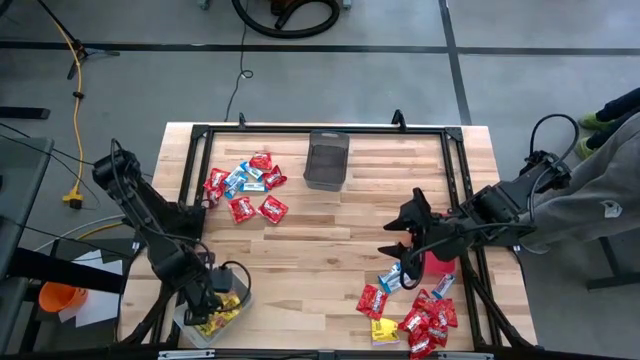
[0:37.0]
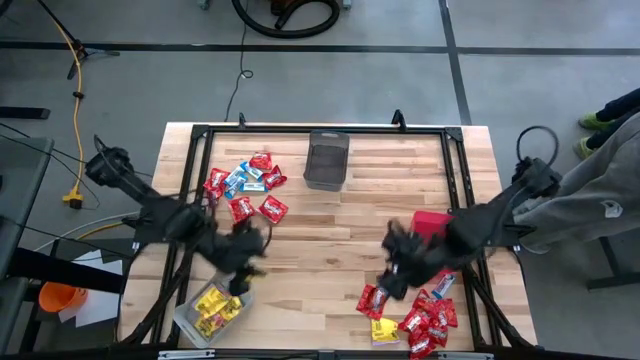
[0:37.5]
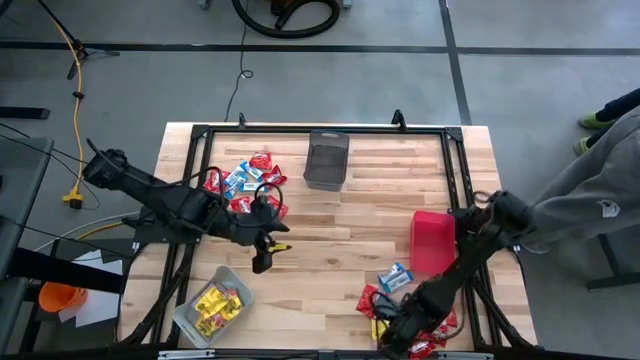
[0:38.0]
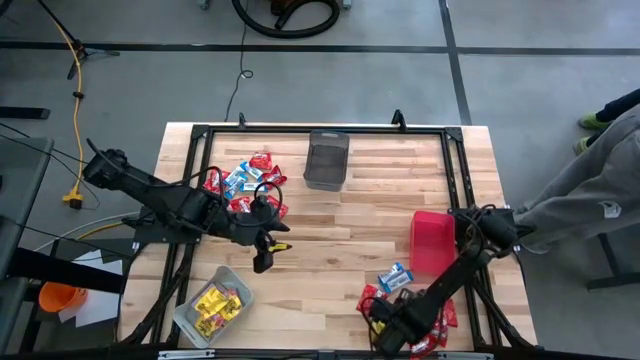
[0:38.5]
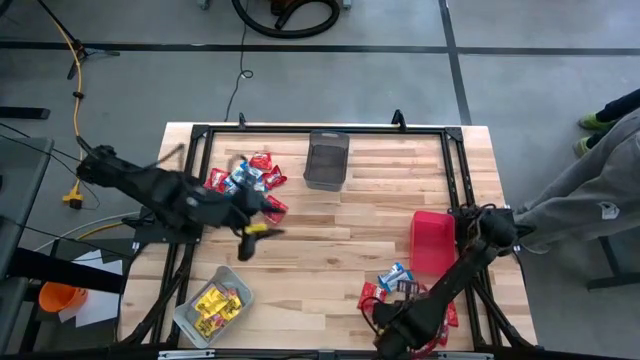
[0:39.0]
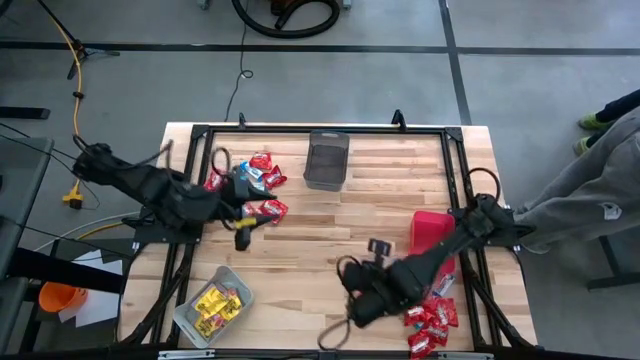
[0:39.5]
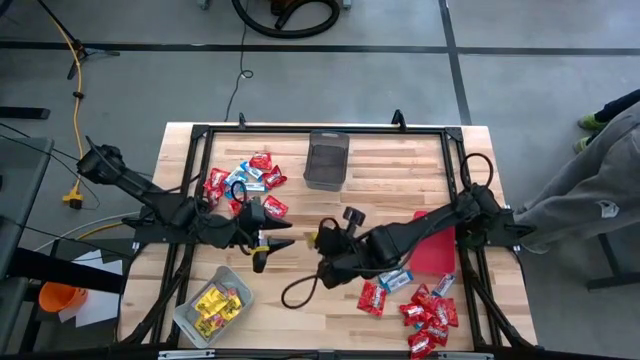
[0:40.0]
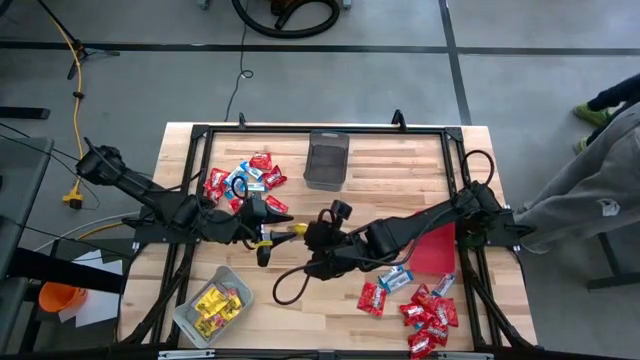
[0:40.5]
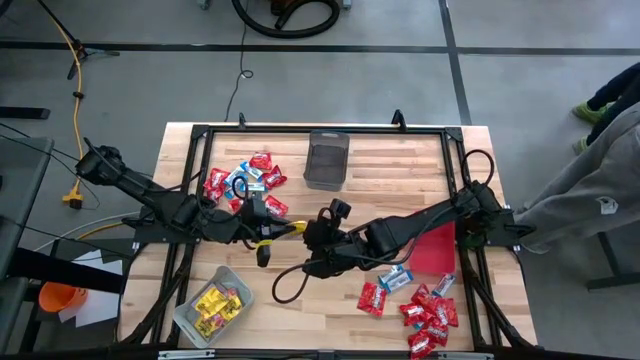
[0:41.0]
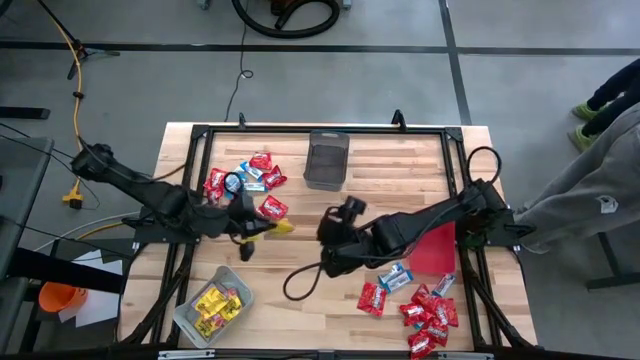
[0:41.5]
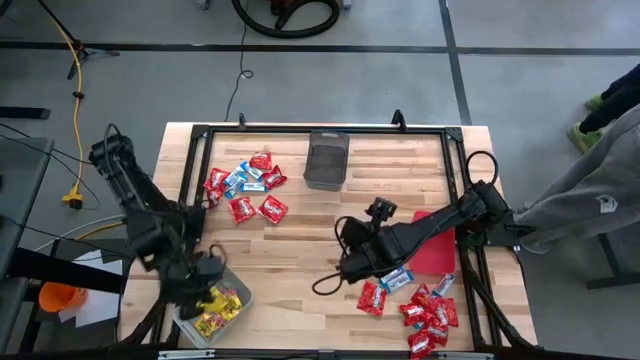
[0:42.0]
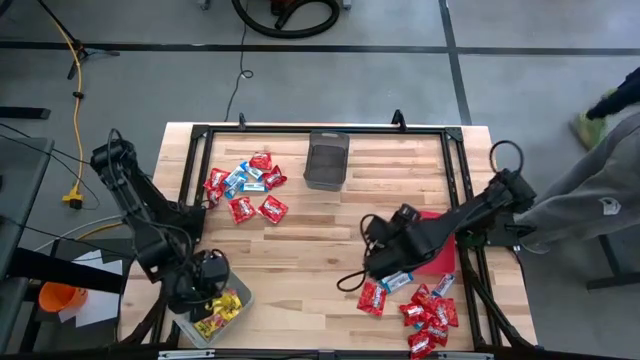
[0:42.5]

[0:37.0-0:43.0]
Task: Sort candy
Put the yellow candy pack into the gray bin

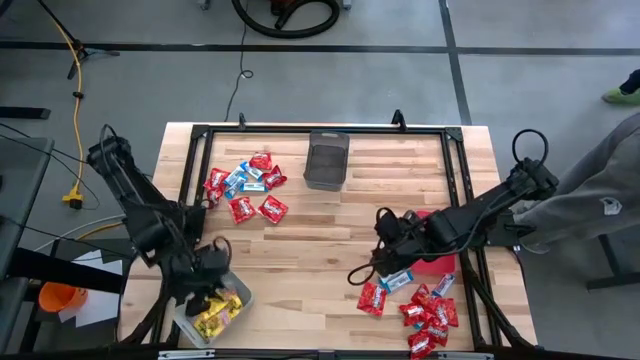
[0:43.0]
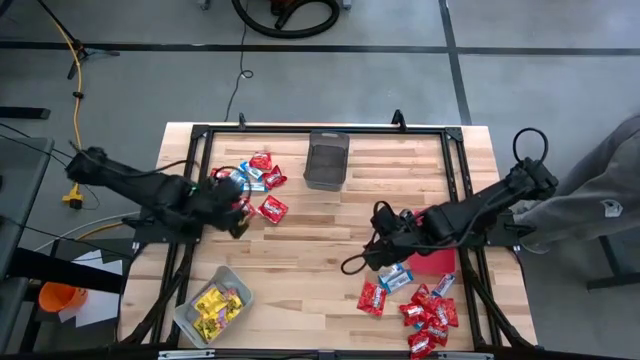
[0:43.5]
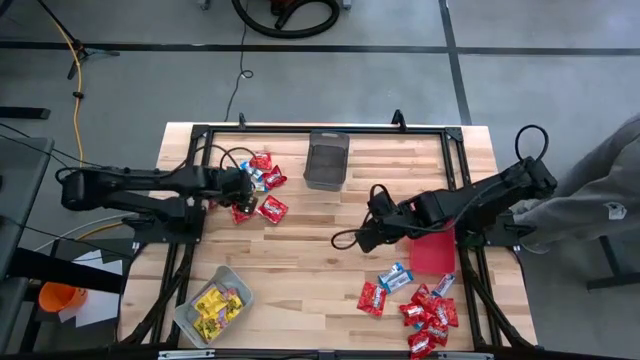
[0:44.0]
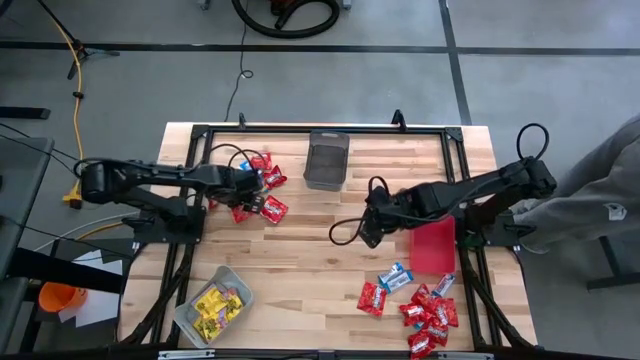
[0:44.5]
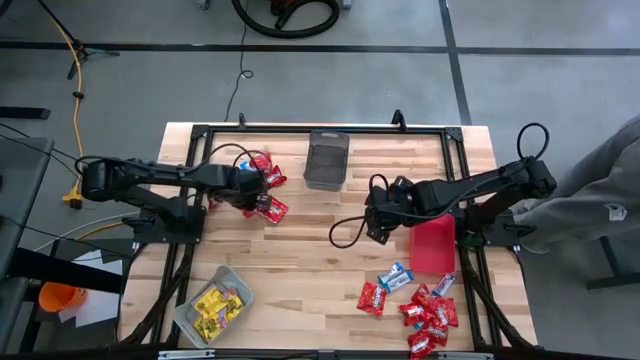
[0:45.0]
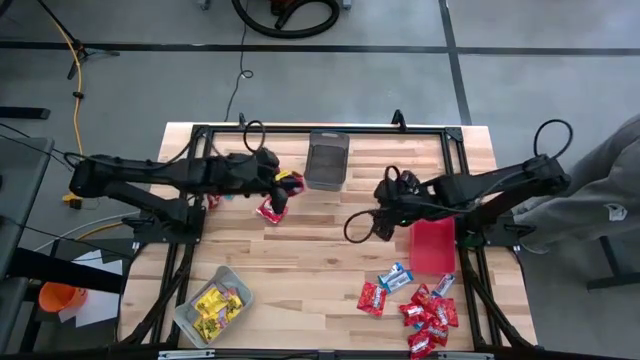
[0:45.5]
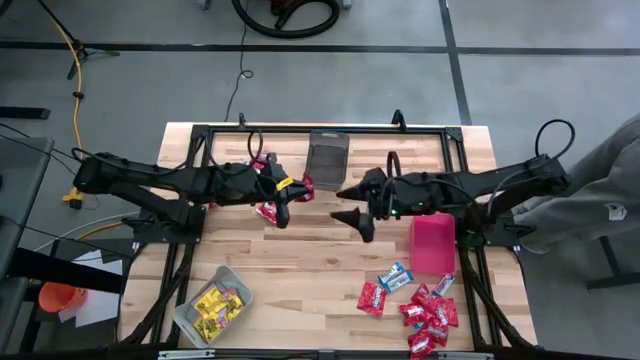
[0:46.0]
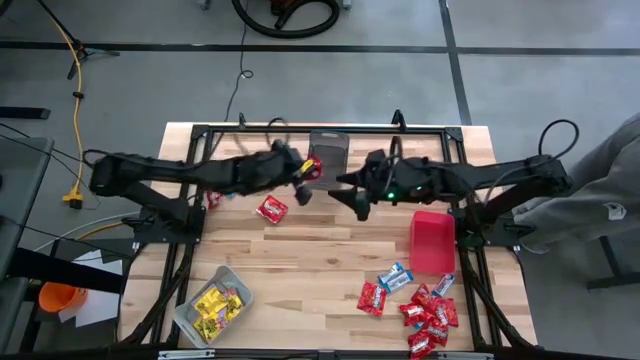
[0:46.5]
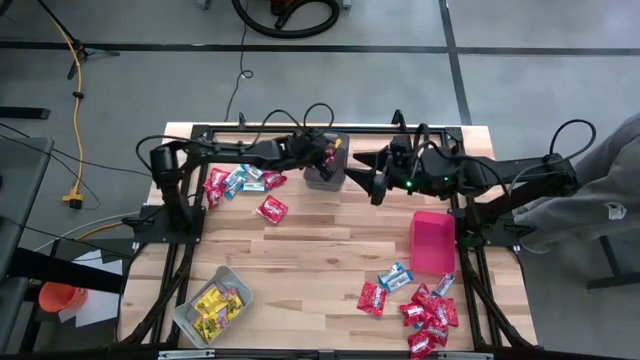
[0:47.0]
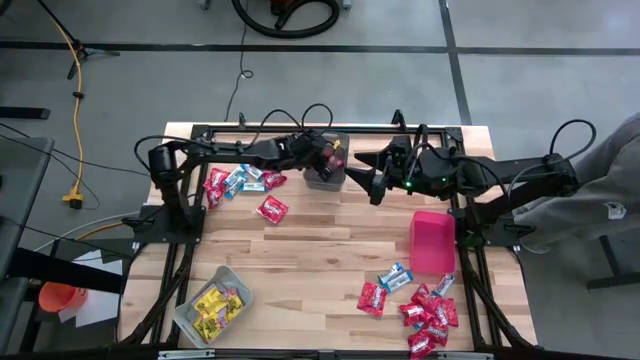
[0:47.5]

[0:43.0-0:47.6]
Put the red candy pack into the black bin

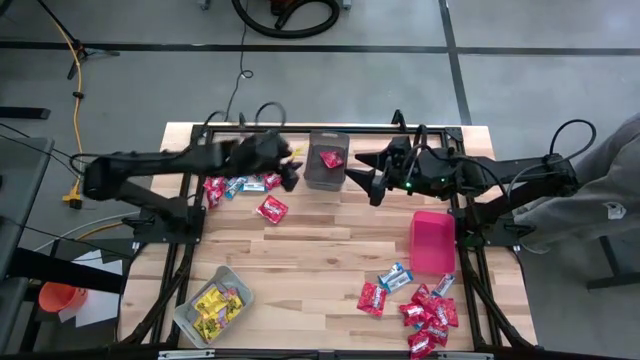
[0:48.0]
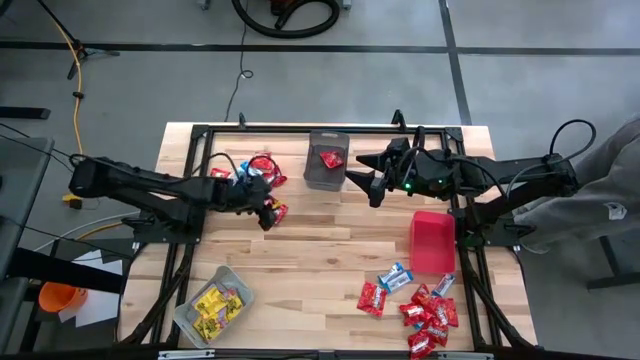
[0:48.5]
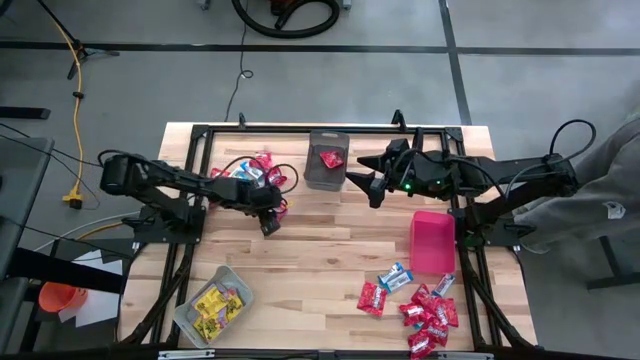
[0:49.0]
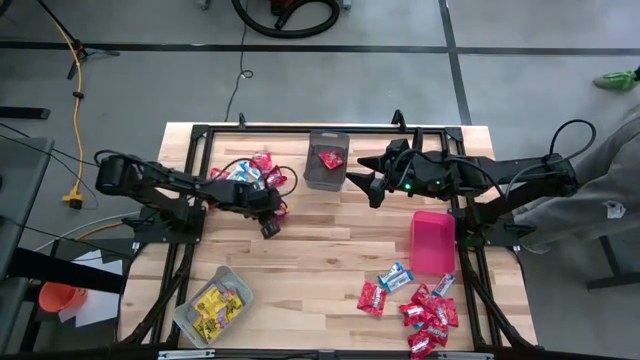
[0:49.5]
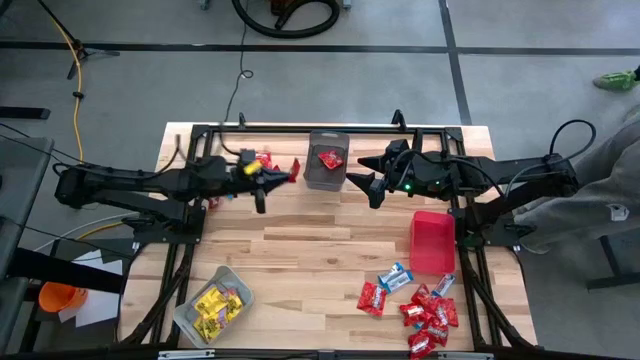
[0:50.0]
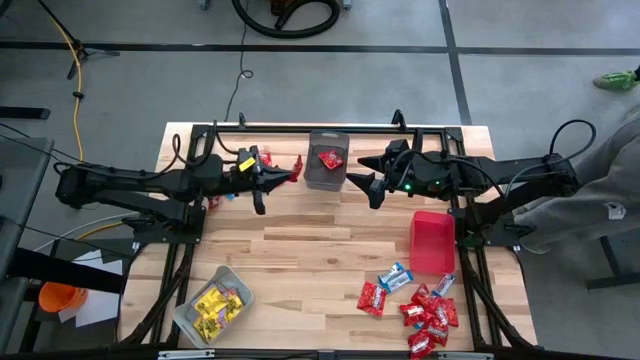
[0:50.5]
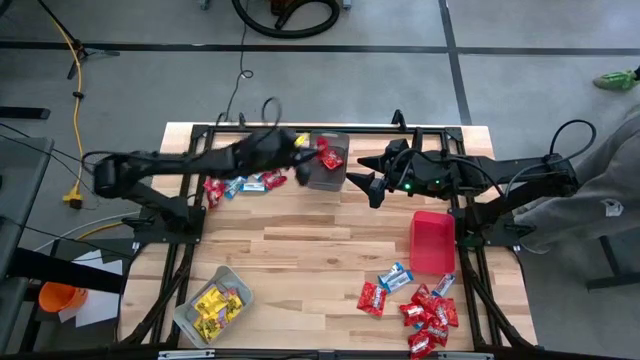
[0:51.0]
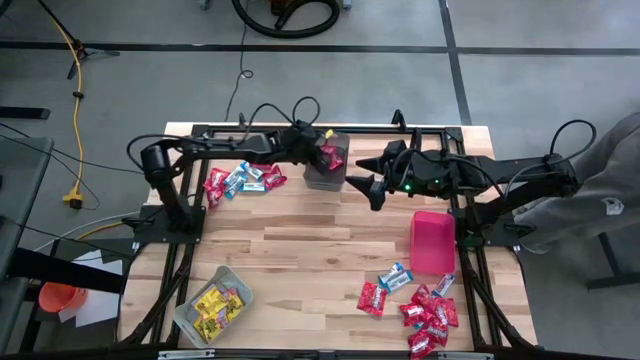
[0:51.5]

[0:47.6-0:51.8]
Put the red candy pack into the black bin

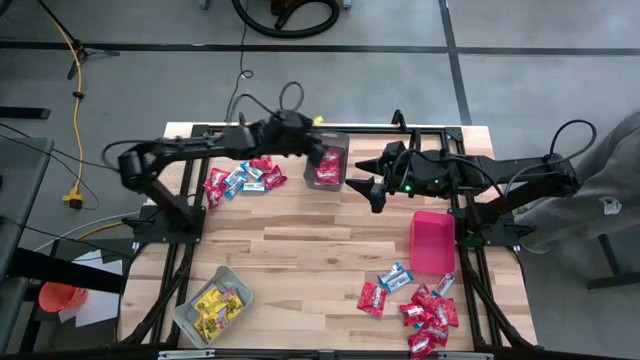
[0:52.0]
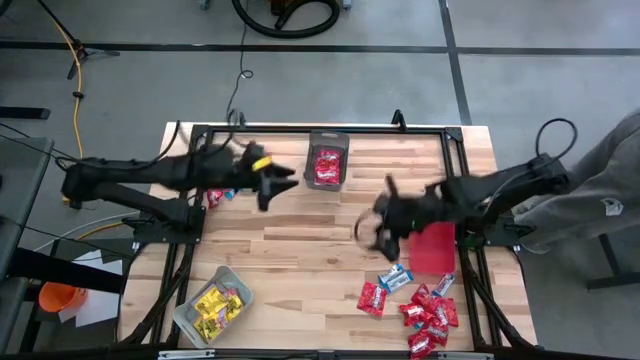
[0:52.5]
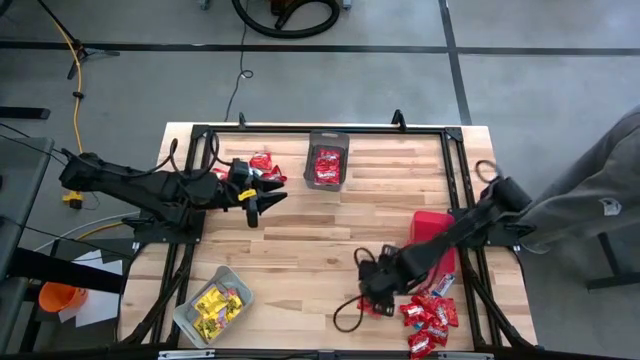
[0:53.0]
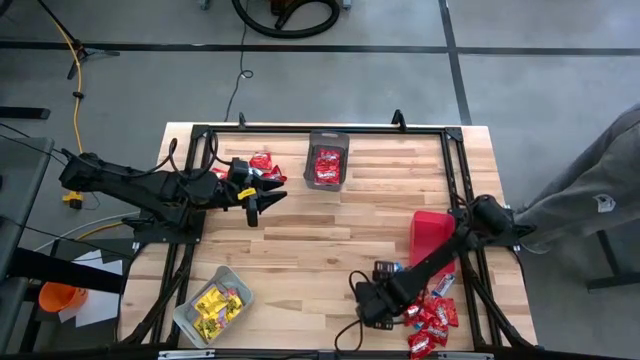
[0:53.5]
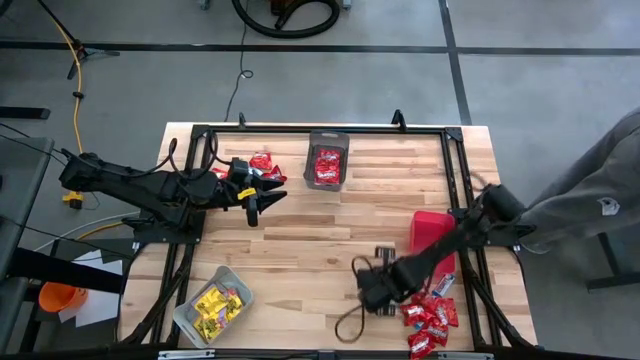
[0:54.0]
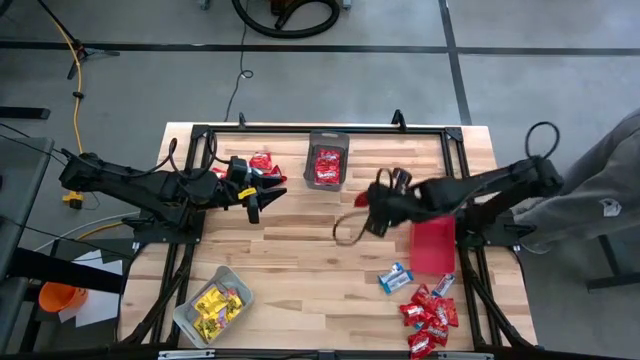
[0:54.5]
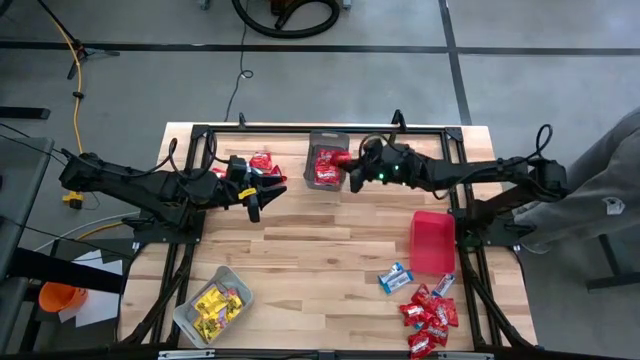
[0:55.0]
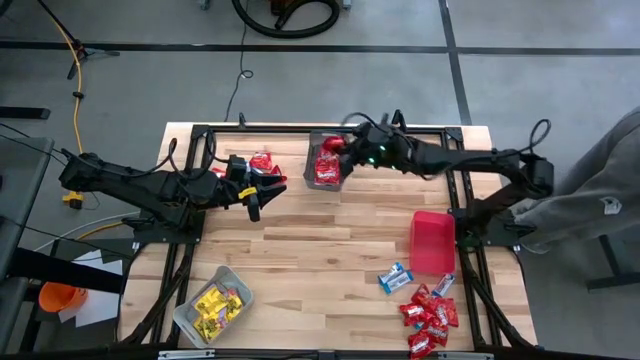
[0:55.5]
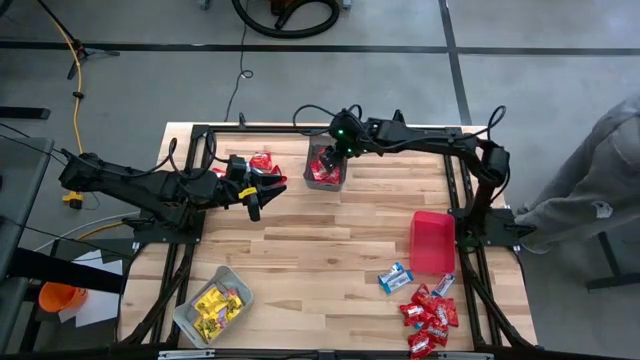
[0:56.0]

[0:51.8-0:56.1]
Put the red candy pack into the black bin

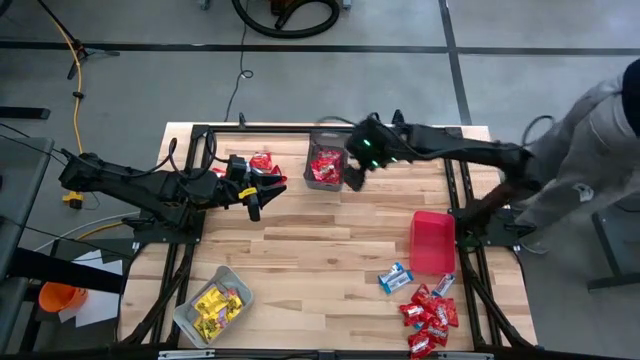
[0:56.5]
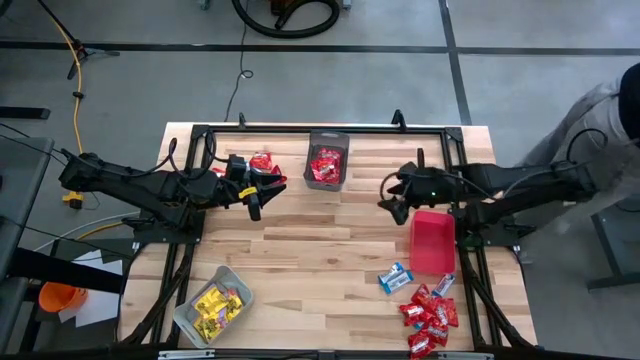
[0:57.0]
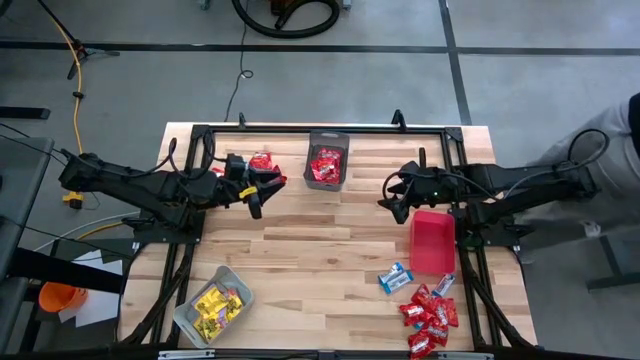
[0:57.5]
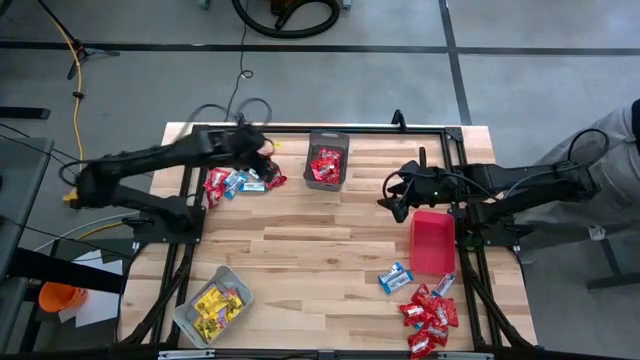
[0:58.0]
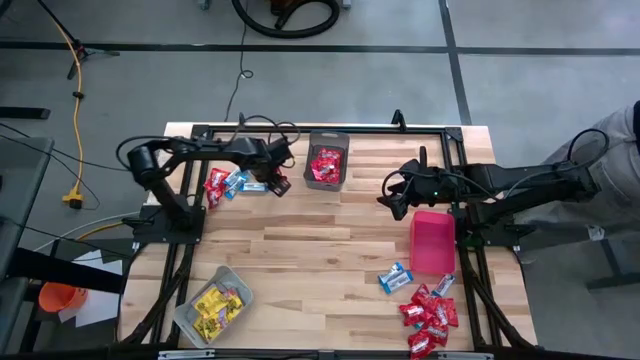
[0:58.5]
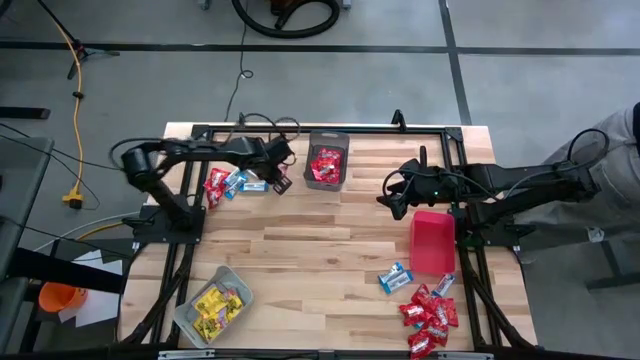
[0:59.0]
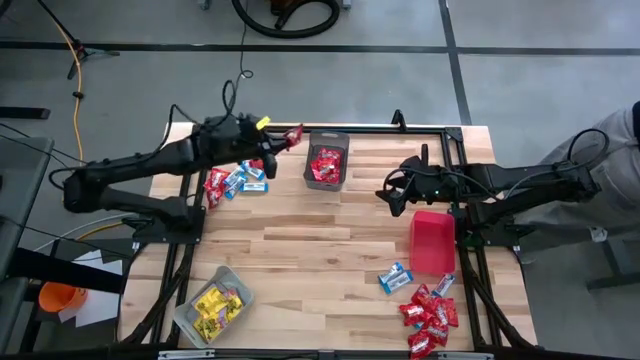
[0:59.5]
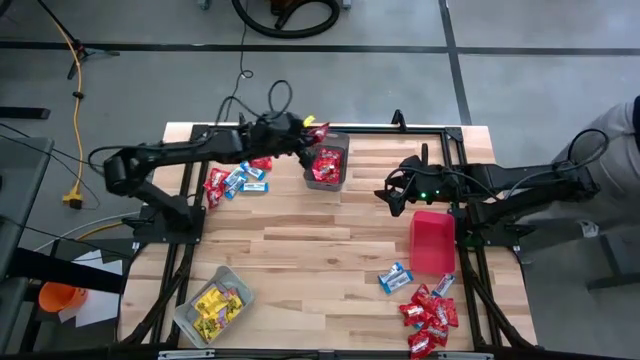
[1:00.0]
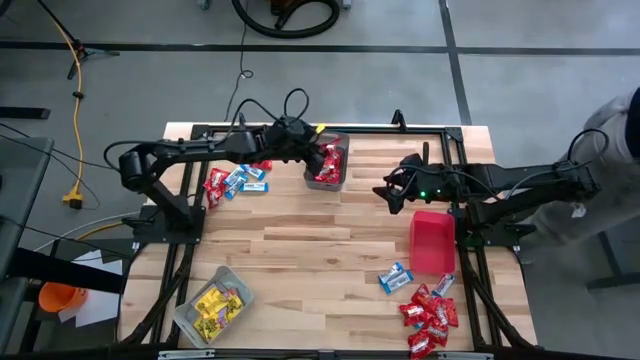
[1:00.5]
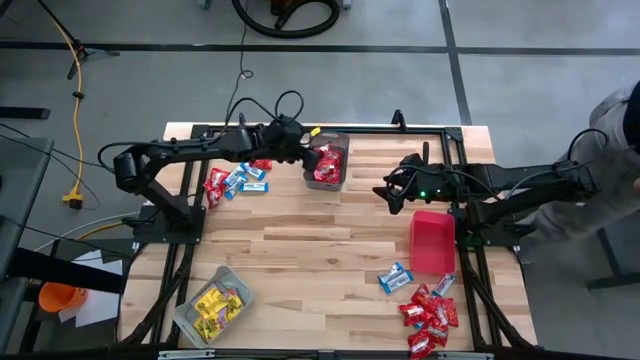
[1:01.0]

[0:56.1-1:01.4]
Put the red candy pack into the black bin
